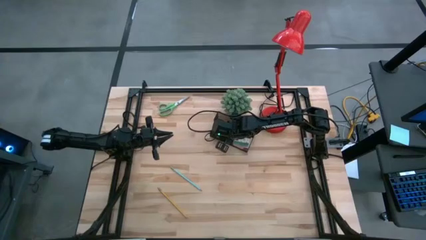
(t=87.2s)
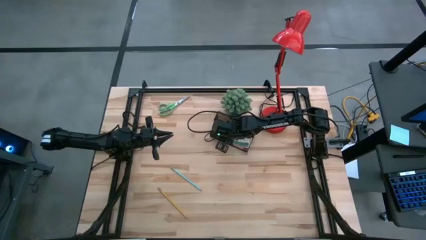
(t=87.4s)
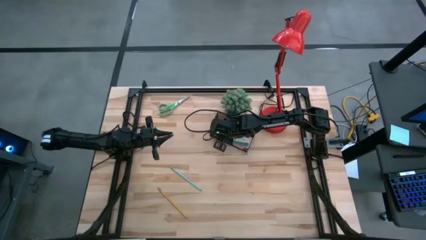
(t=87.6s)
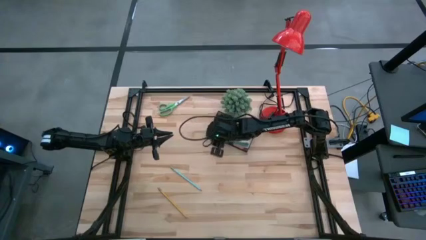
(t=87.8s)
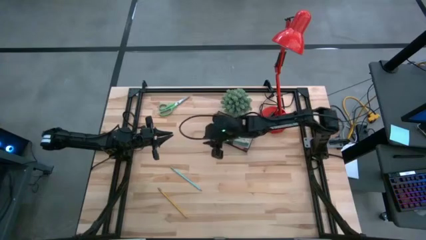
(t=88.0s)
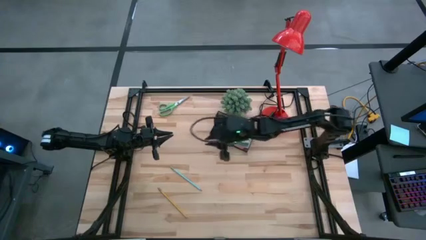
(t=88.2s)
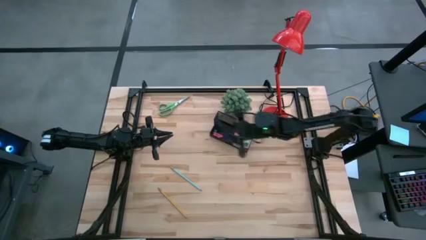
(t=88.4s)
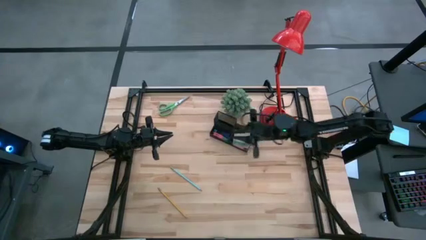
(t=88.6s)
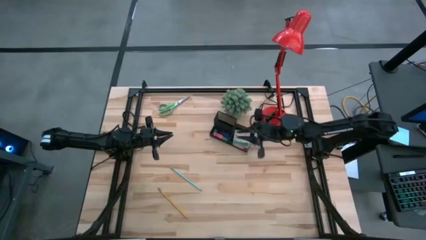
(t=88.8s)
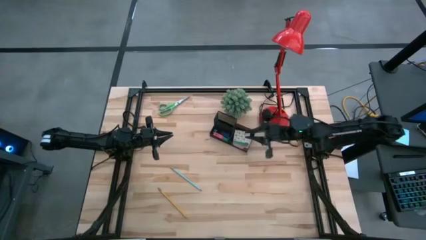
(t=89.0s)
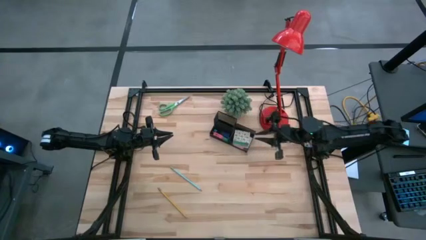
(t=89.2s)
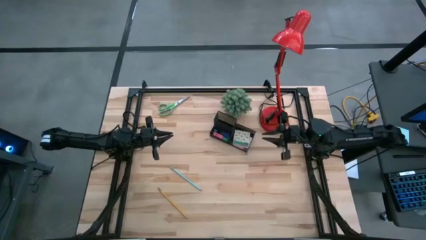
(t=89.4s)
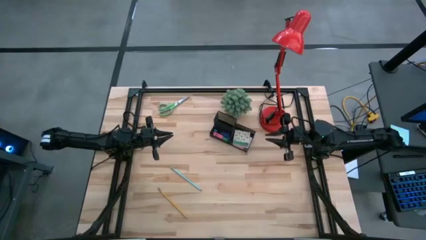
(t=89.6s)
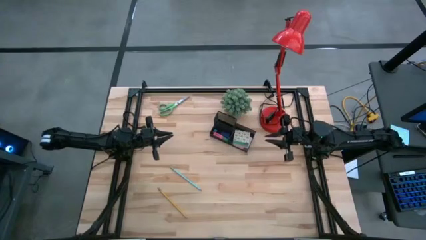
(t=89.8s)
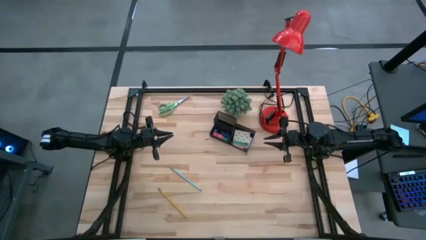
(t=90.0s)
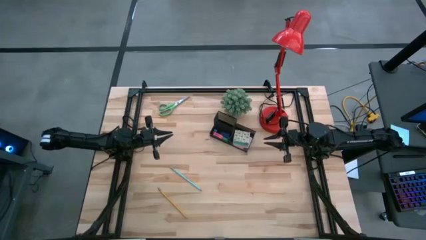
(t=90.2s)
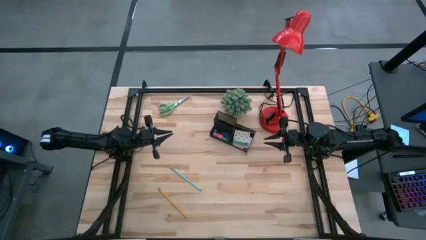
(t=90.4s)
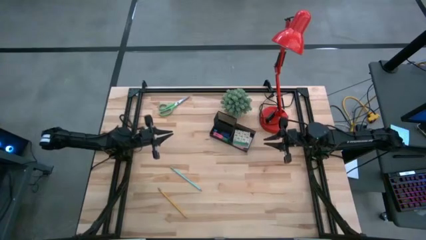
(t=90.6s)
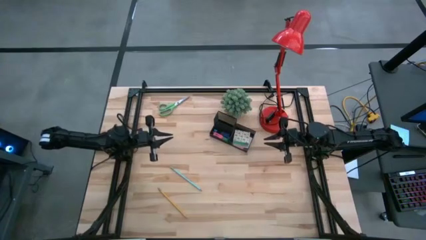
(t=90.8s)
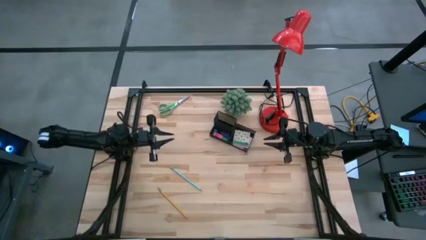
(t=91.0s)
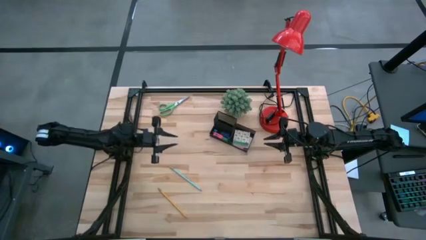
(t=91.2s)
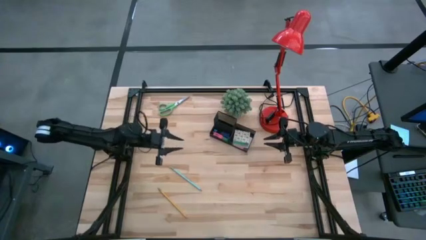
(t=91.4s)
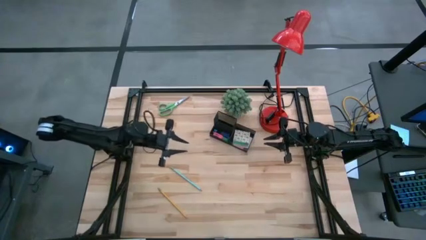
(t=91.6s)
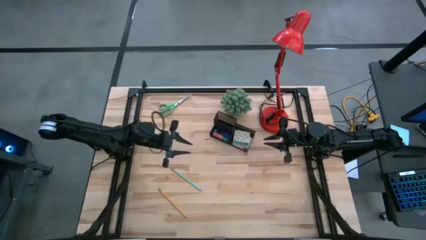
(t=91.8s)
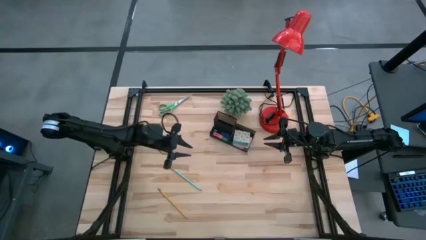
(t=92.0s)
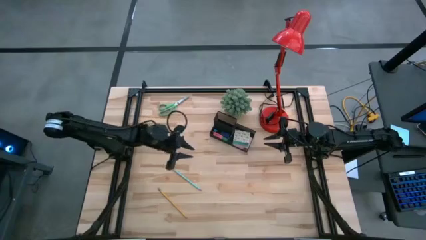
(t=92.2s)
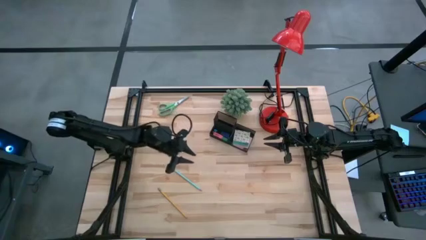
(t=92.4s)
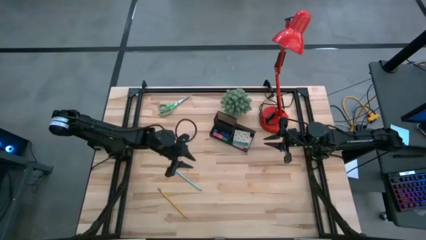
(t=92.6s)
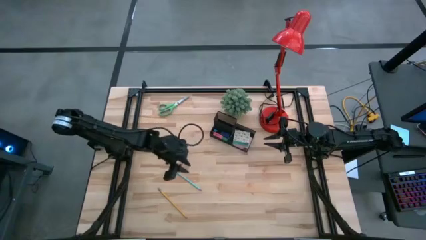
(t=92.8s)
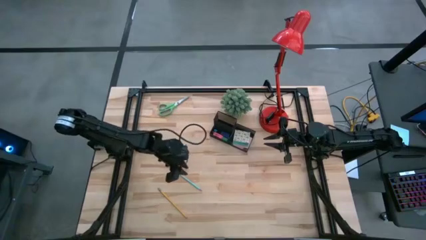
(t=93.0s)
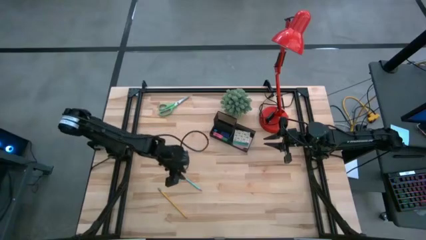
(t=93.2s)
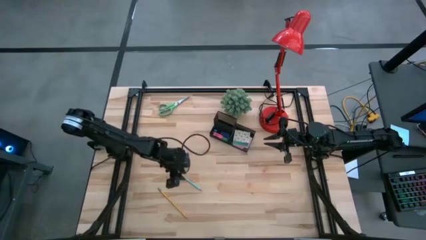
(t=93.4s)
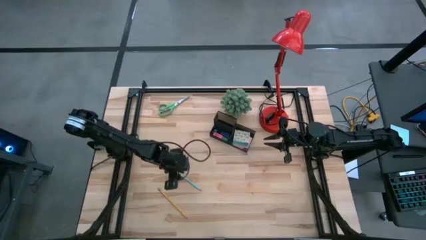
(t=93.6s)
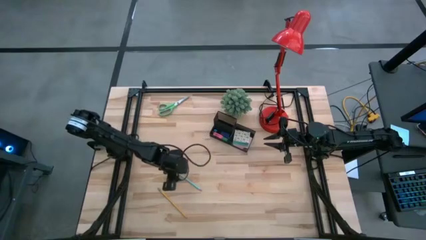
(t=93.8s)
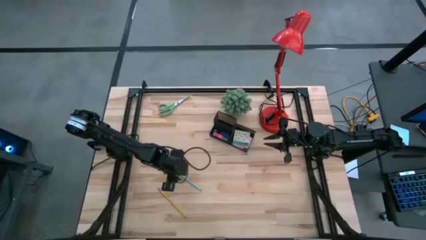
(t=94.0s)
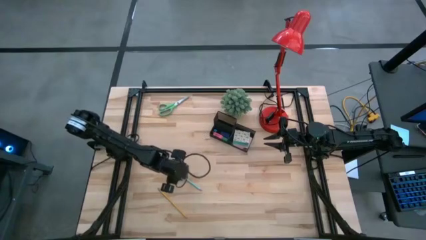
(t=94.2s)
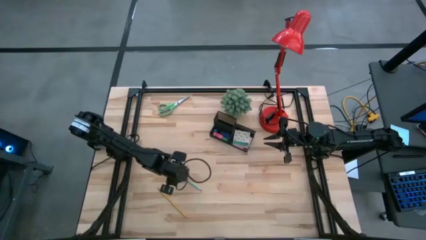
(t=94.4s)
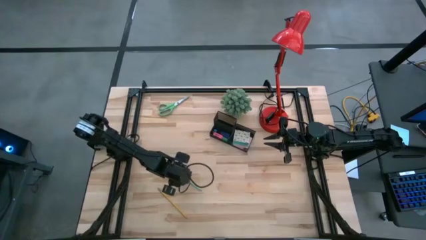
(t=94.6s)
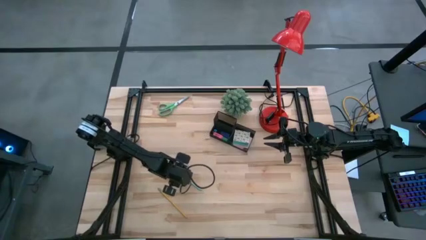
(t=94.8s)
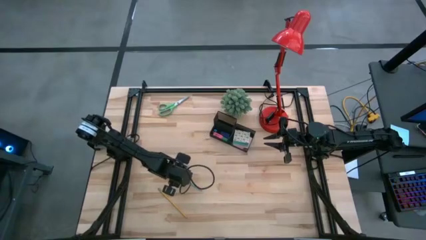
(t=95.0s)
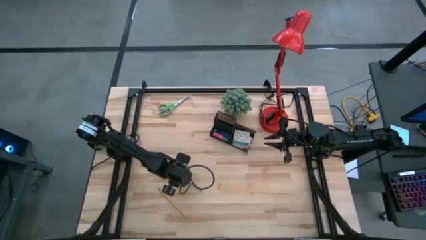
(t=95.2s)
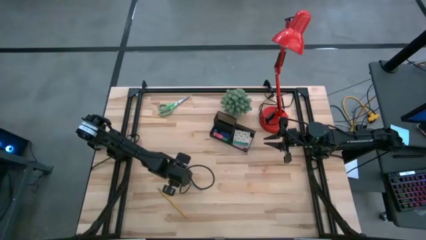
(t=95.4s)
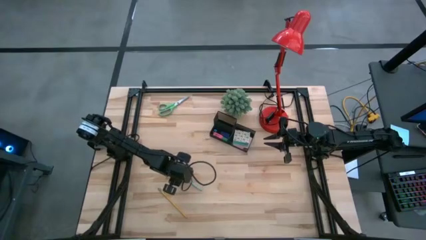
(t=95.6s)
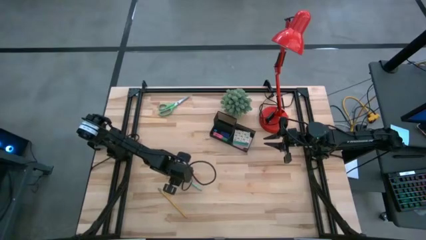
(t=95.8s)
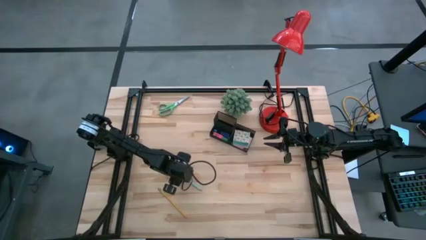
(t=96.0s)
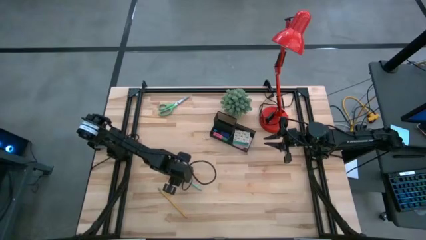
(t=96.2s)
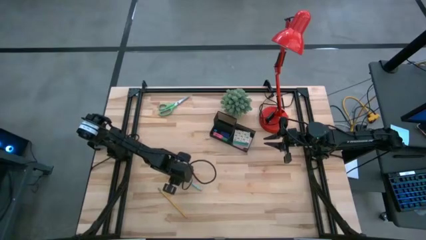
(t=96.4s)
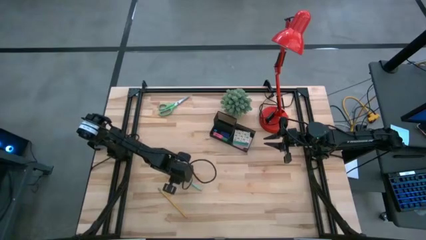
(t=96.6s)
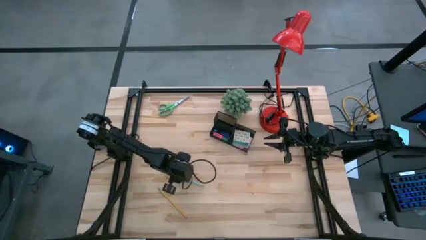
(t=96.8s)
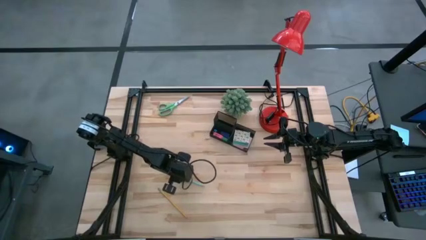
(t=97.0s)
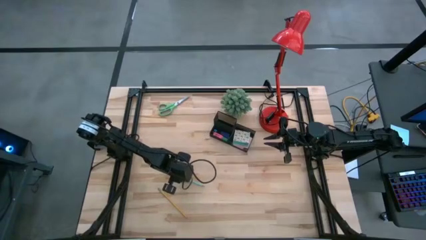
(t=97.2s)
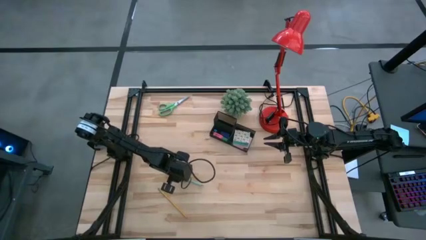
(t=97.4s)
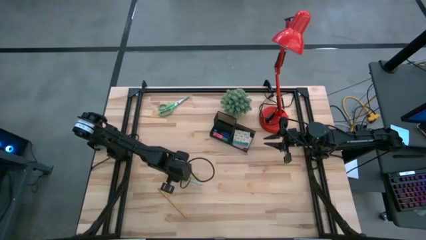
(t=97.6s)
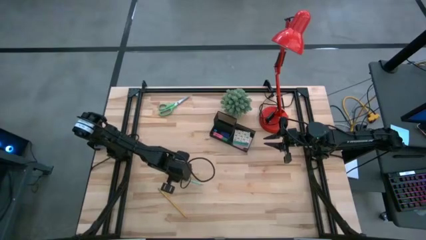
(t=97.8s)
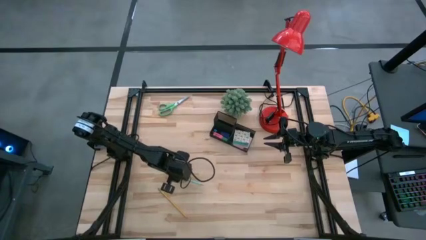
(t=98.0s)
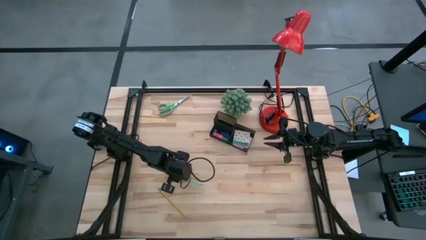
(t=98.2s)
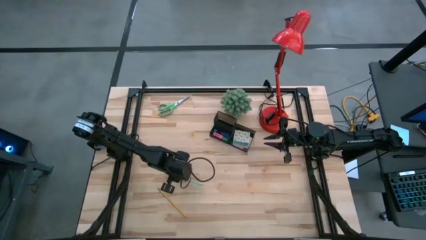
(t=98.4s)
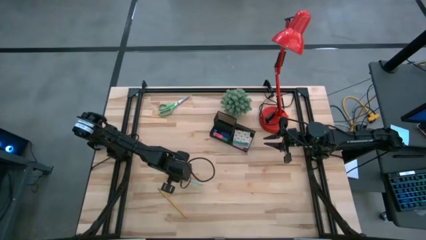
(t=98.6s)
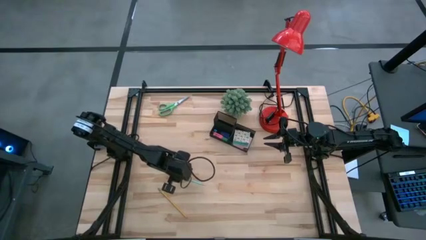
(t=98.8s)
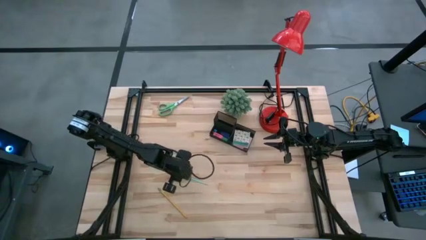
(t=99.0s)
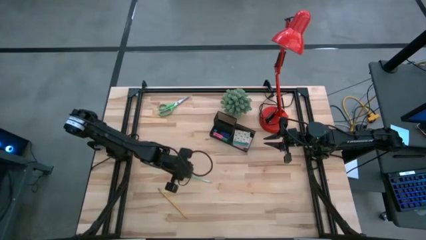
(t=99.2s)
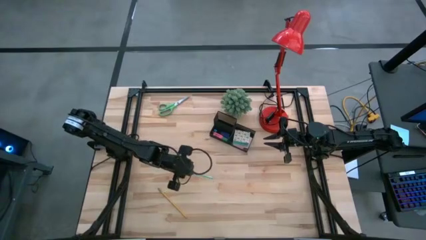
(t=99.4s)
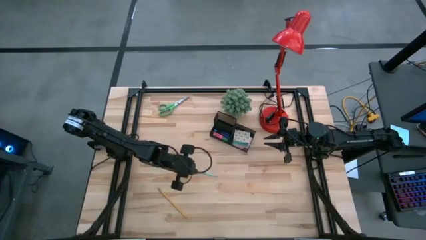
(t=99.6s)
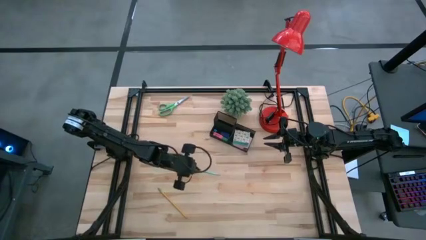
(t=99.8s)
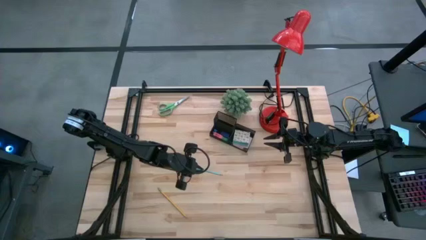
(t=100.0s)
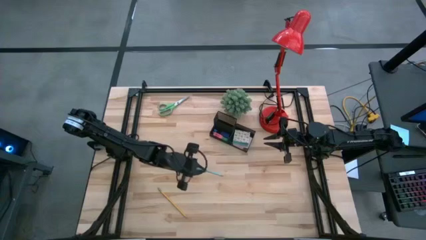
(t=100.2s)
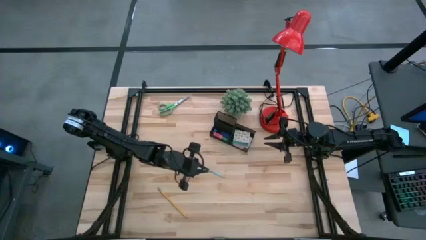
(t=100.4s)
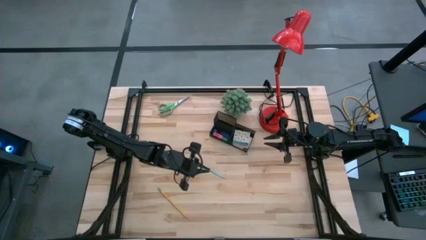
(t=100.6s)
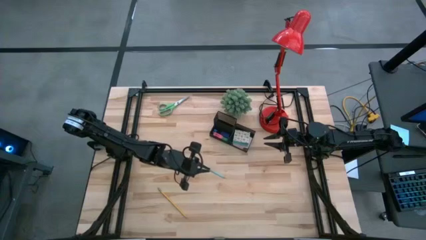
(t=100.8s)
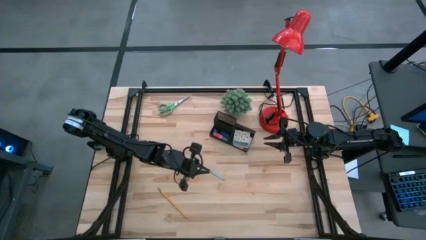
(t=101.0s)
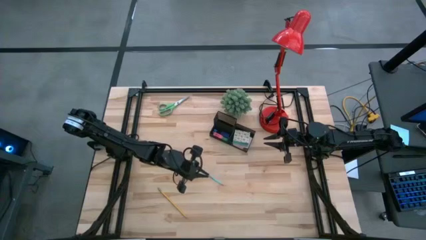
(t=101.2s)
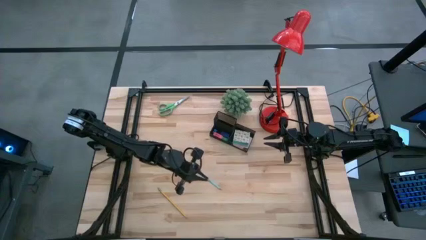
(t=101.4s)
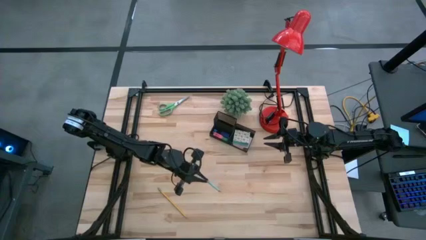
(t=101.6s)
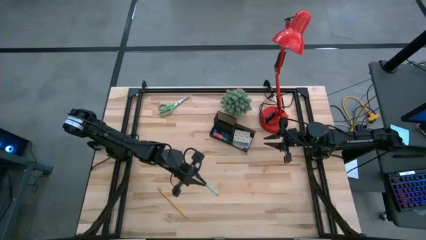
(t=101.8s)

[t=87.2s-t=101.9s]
Task: Pick and place office supplies into organizer
Put the light blue pencil into the black desk organizer
